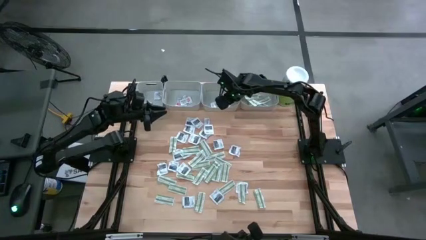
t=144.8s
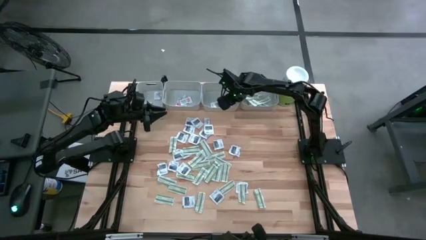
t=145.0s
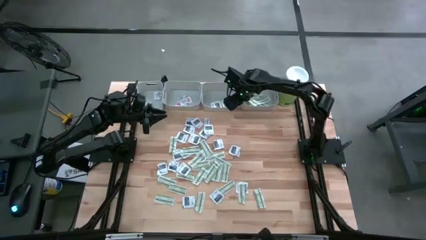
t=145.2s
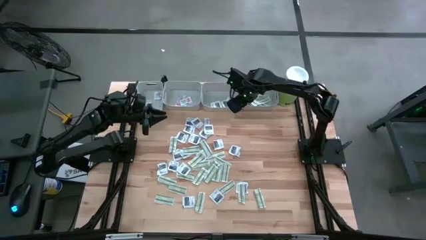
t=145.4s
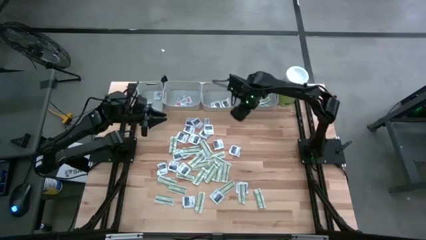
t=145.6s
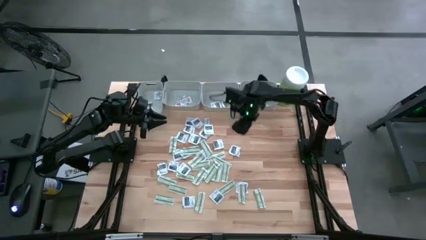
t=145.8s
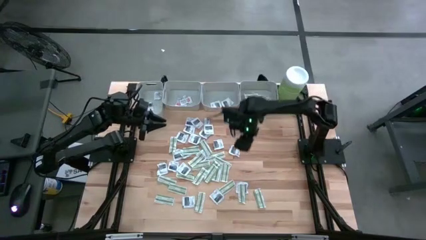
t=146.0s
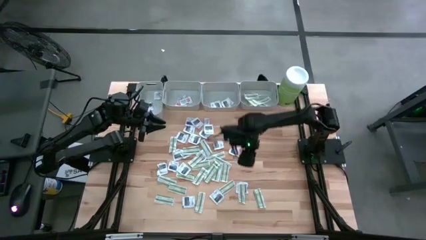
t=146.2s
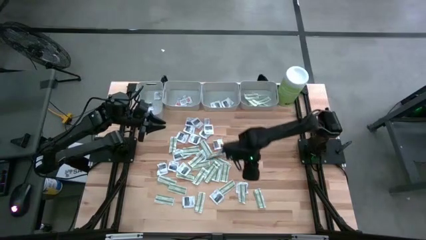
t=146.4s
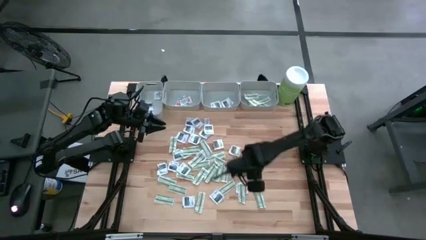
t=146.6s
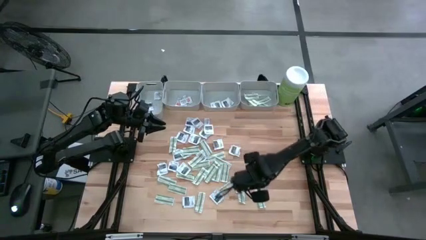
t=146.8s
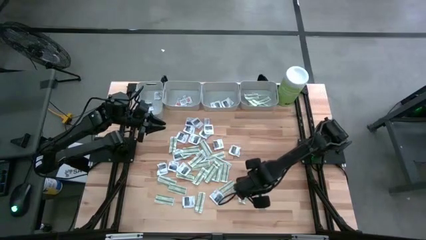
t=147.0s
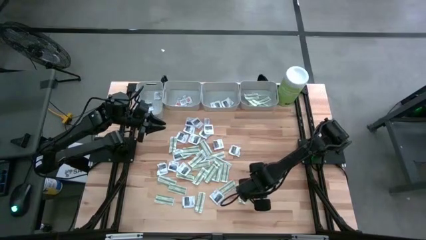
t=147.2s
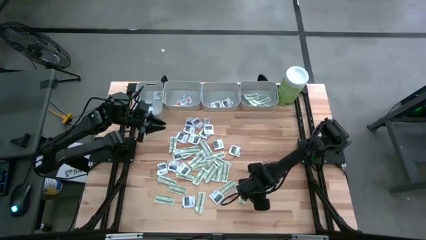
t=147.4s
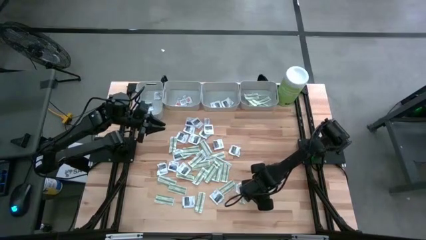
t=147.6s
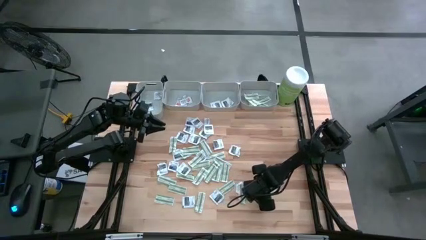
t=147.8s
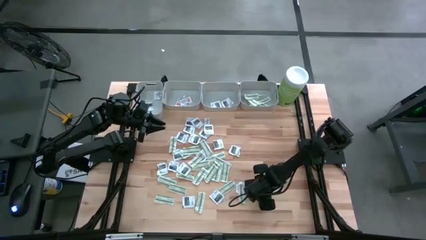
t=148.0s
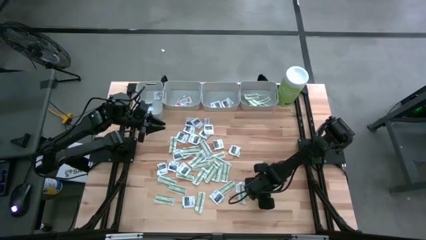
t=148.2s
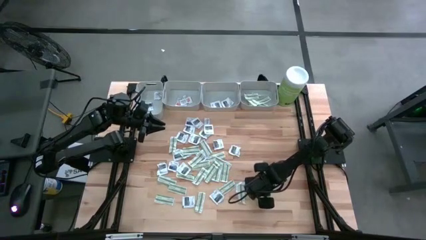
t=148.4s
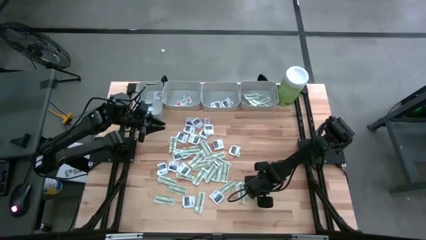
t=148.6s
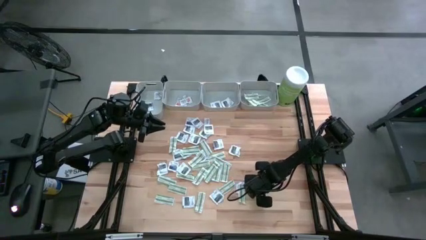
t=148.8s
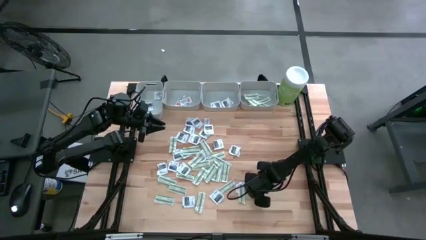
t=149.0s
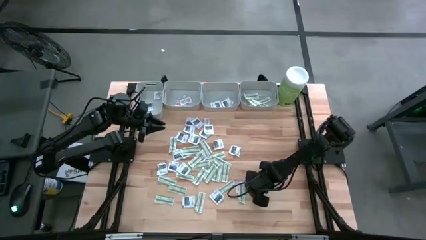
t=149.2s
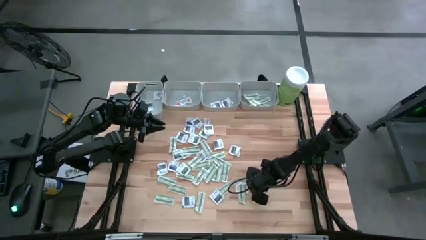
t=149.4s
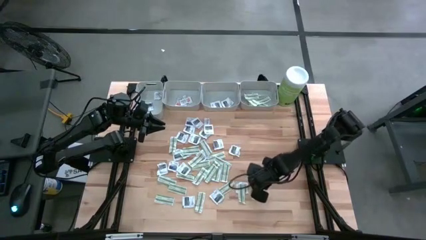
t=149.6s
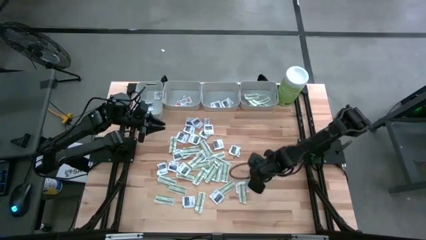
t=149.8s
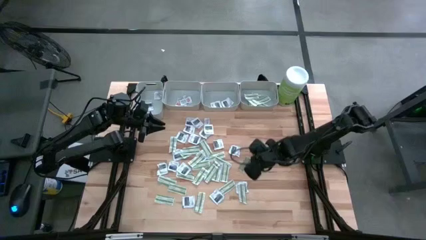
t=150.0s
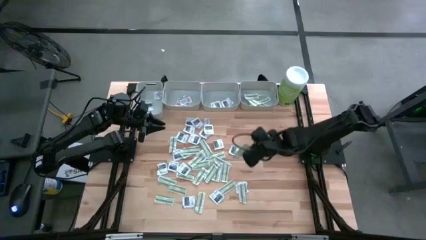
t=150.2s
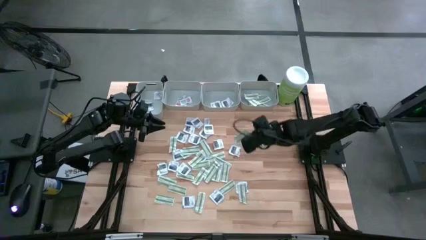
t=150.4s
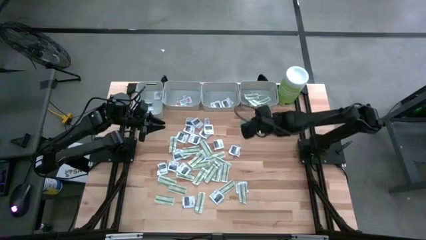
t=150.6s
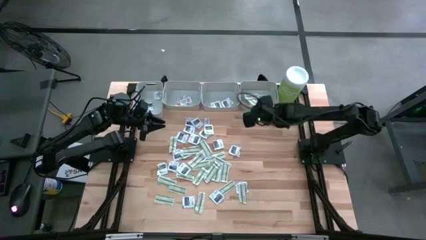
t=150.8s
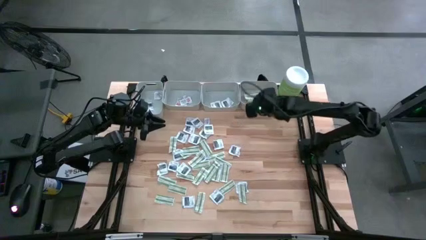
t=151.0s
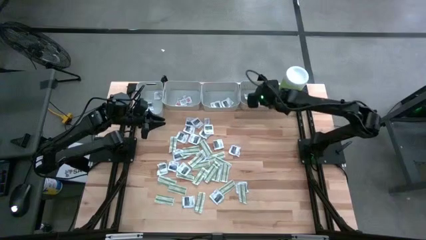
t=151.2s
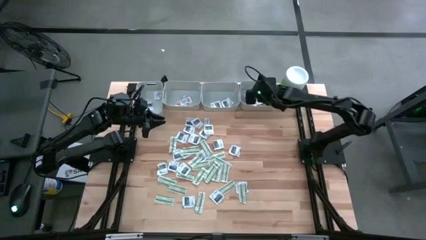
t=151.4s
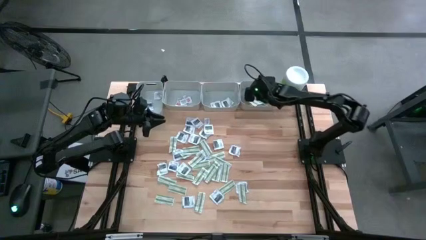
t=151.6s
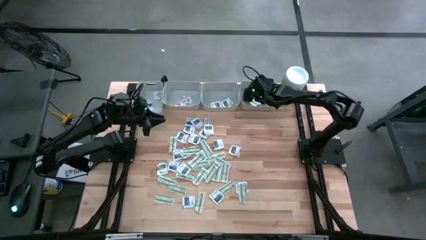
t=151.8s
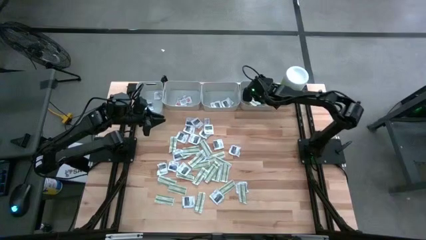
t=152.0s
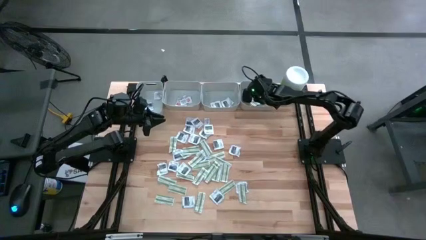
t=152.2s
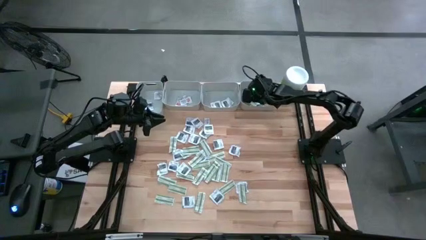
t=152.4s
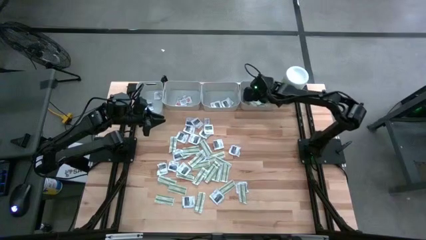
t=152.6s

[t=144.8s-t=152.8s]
Task: Pick & Place First Aid Supplies
Put the green bandage into the right gray bin

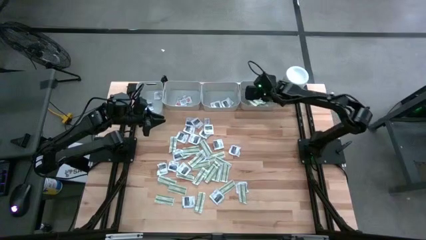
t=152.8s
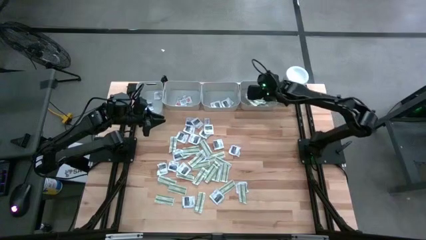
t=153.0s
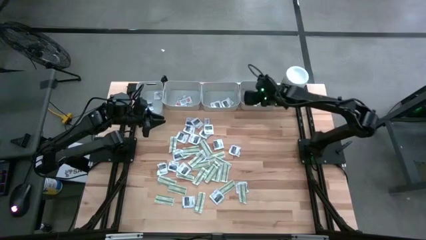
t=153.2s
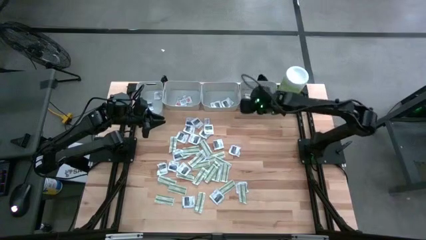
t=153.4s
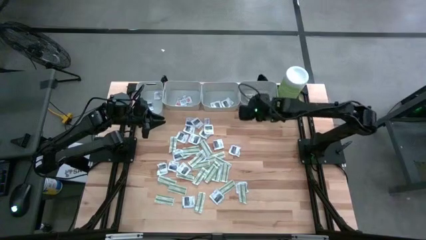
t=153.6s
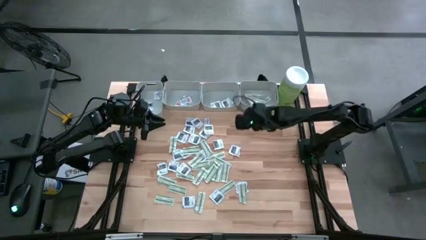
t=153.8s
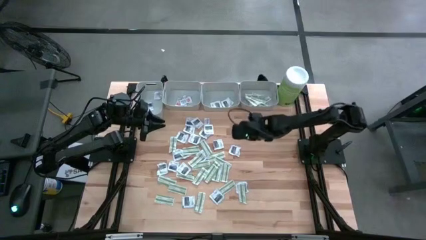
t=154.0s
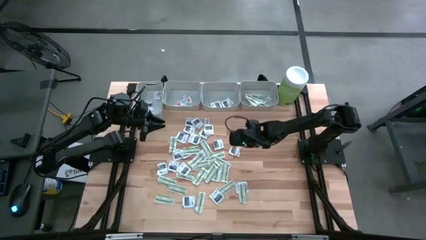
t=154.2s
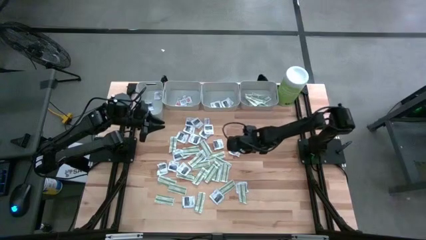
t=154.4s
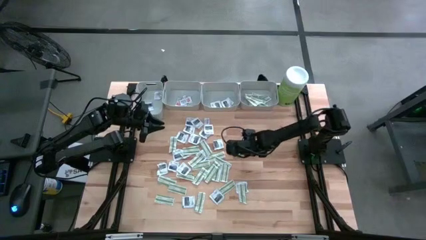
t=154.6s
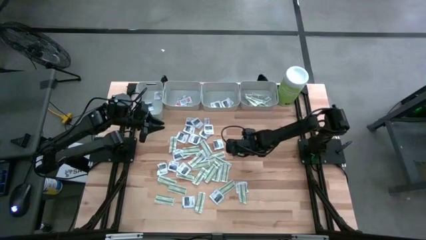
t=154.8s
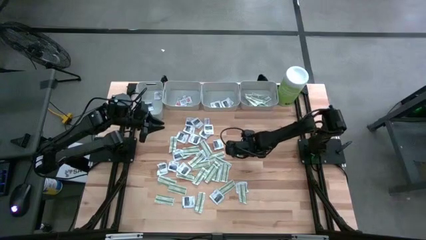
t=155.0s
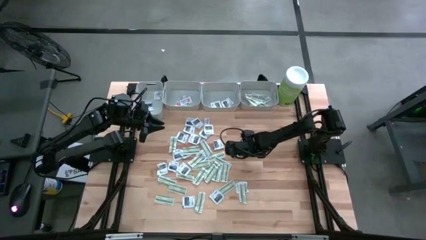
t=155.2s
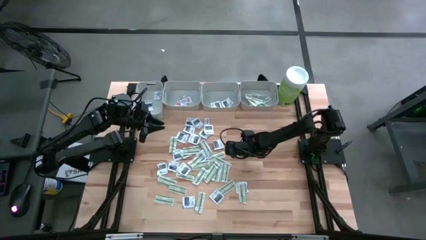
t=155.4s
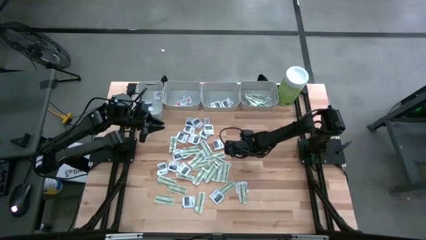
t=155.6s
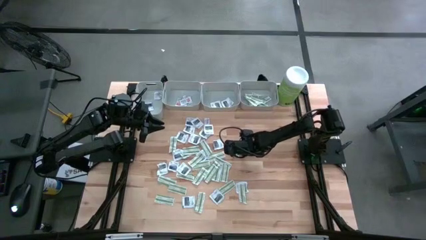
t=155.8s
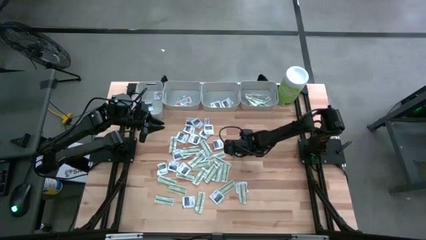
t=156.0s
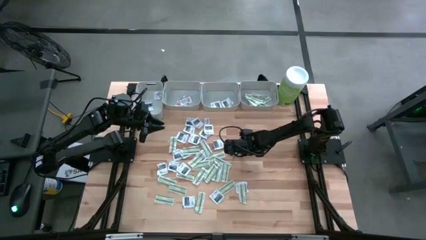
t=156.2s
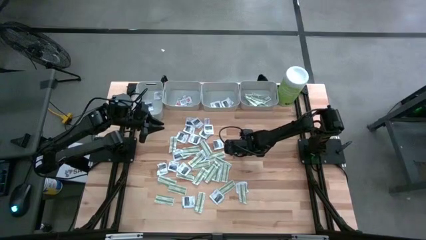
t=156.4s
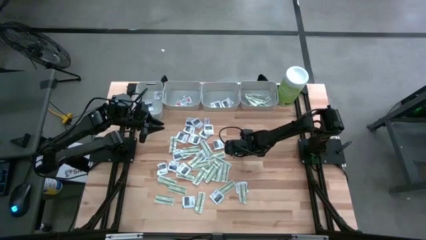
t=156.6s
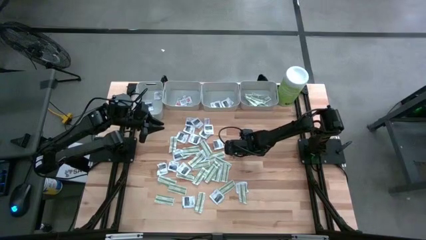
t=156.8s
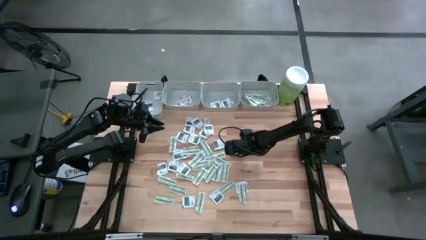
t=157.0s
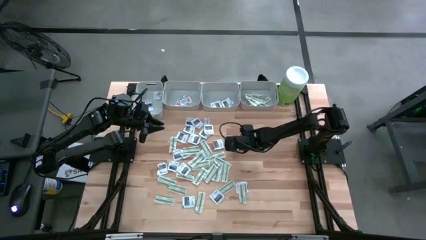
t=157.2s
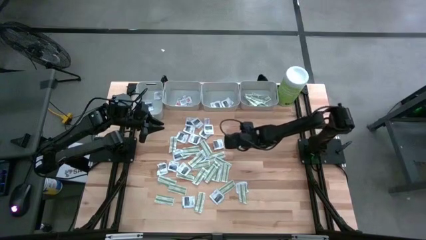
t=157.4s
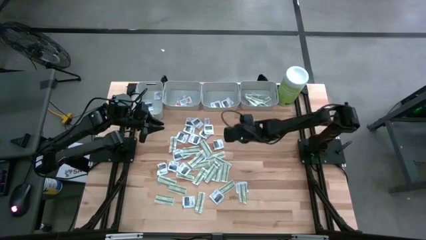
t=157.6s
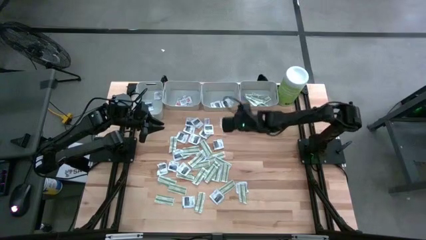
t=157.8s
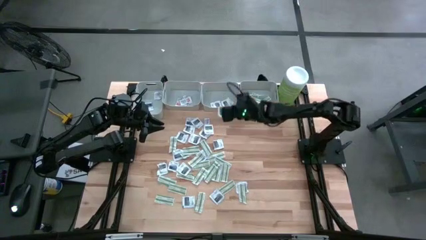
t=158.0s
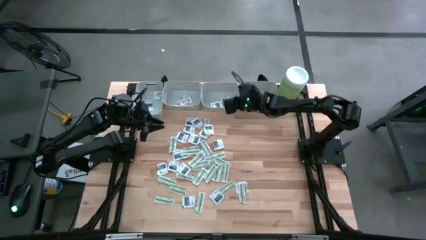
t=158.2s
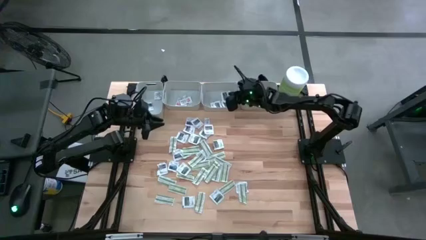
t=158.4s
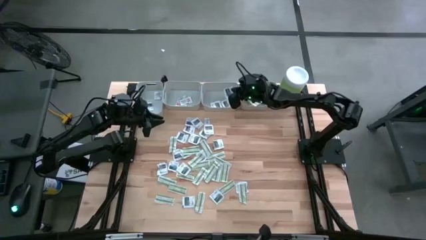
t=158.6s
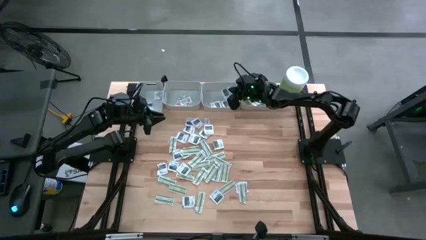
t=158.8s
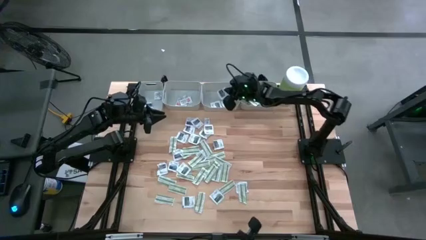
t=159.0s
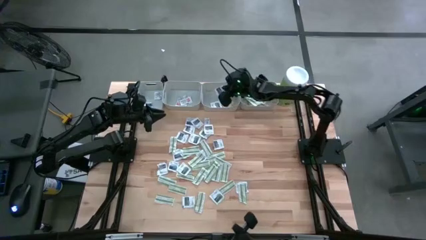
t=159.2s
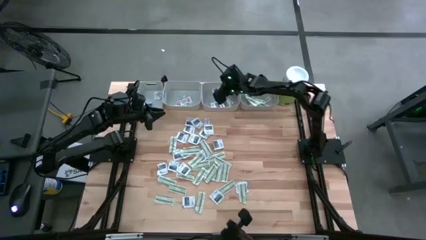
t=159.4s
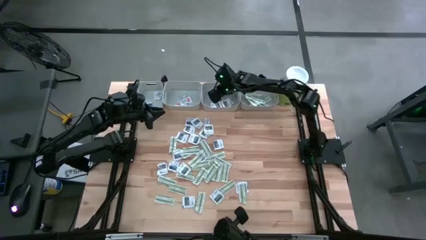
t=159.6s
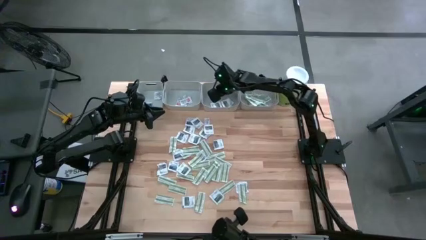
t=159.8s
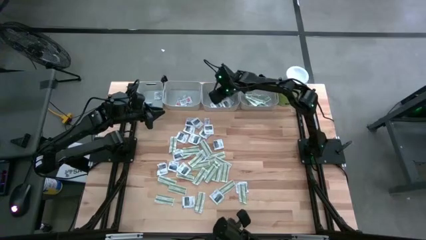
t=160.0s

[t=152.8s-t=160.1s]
Put the gray towelette pack into the middle right gray bin
